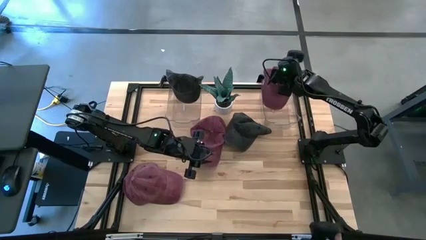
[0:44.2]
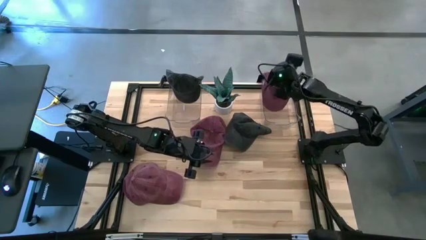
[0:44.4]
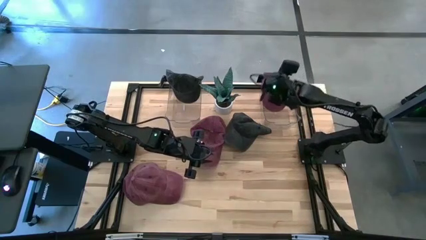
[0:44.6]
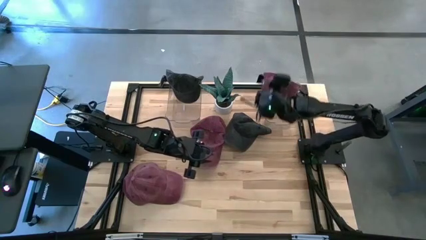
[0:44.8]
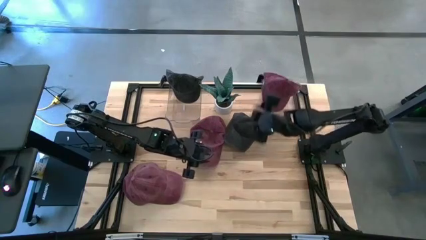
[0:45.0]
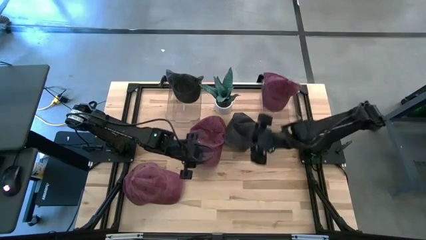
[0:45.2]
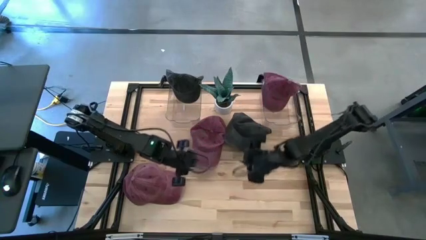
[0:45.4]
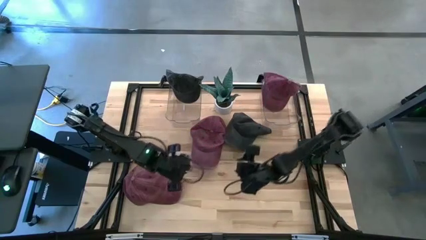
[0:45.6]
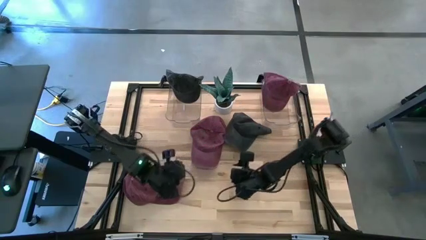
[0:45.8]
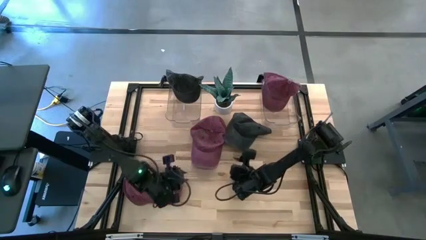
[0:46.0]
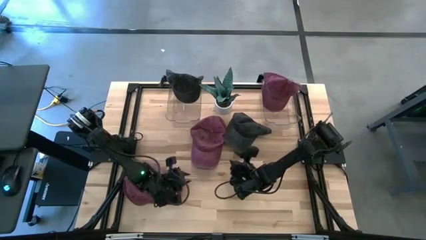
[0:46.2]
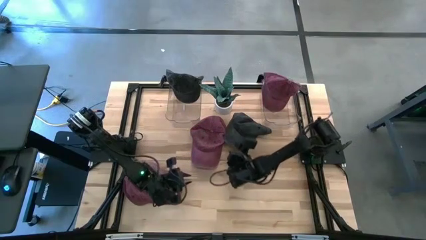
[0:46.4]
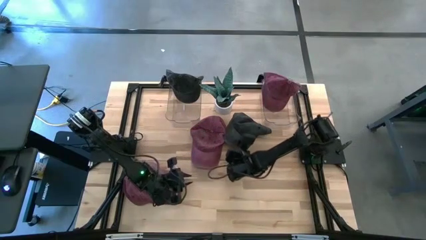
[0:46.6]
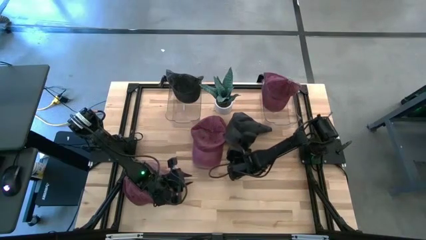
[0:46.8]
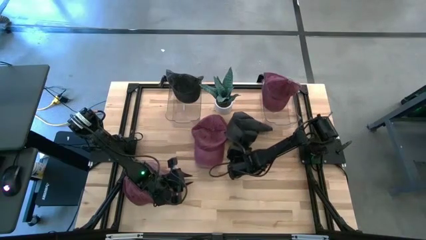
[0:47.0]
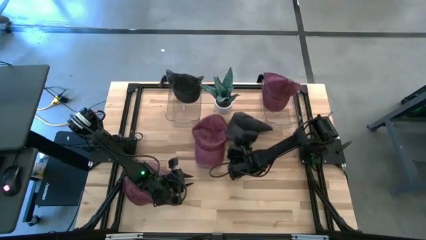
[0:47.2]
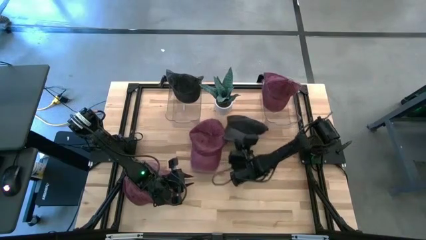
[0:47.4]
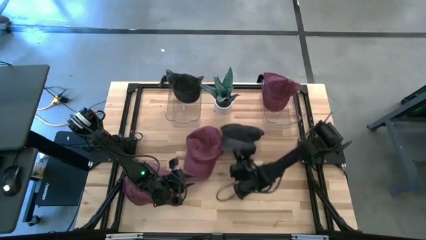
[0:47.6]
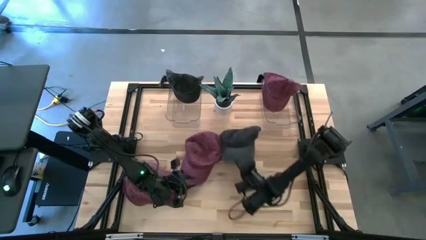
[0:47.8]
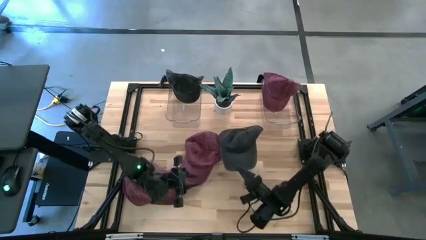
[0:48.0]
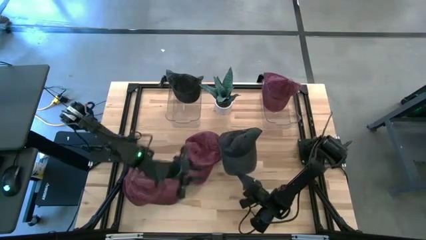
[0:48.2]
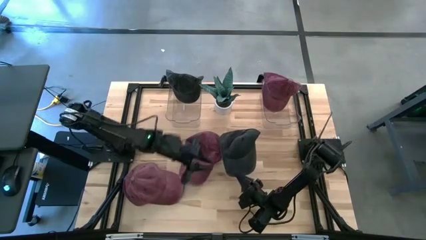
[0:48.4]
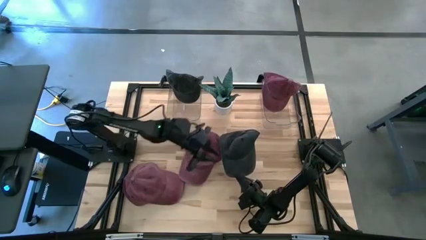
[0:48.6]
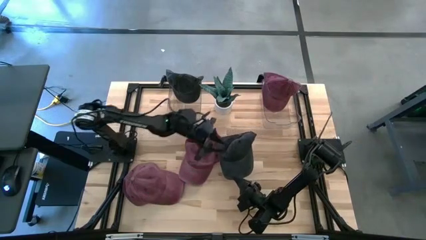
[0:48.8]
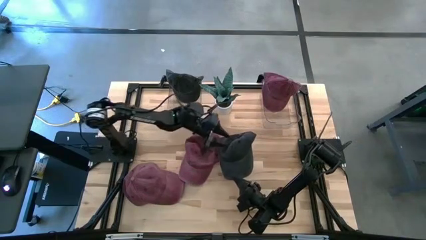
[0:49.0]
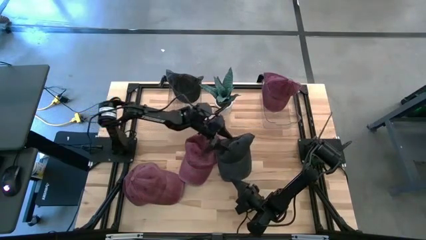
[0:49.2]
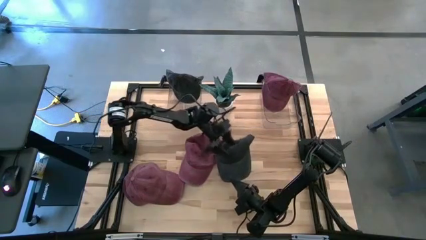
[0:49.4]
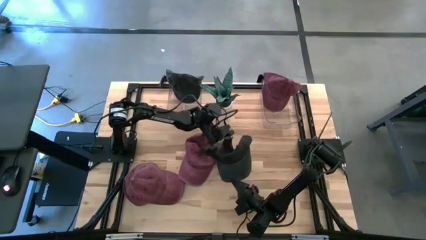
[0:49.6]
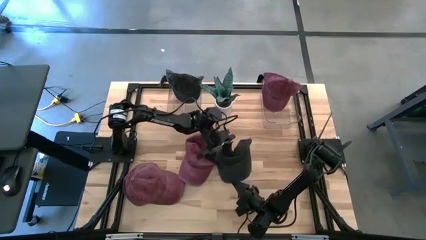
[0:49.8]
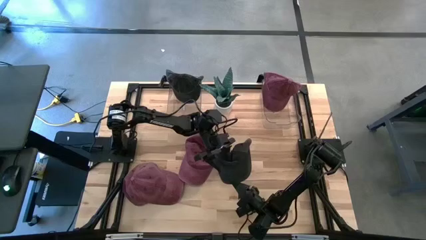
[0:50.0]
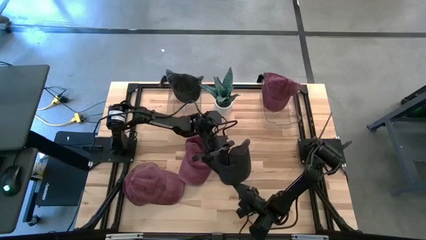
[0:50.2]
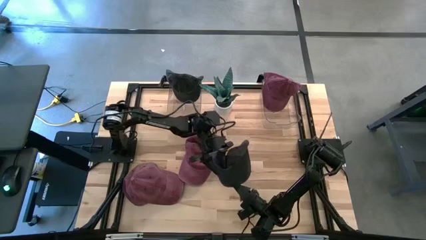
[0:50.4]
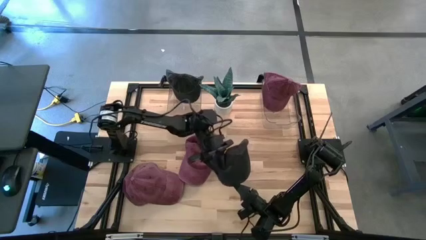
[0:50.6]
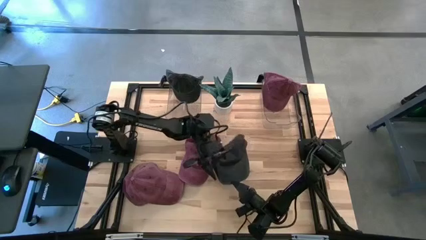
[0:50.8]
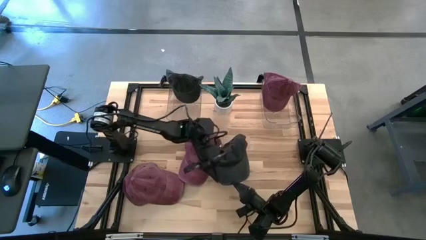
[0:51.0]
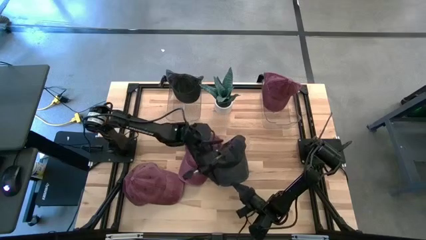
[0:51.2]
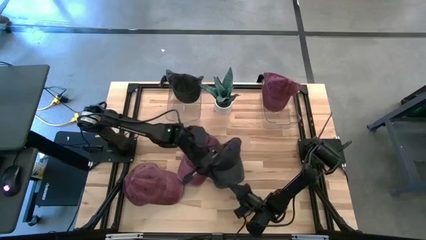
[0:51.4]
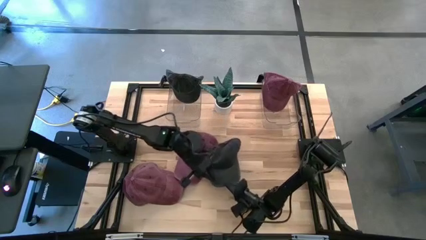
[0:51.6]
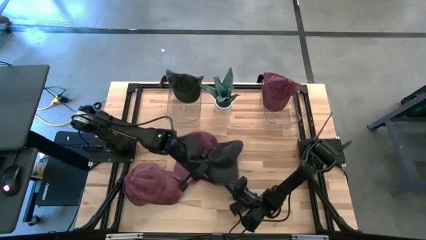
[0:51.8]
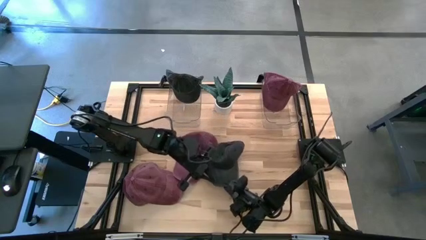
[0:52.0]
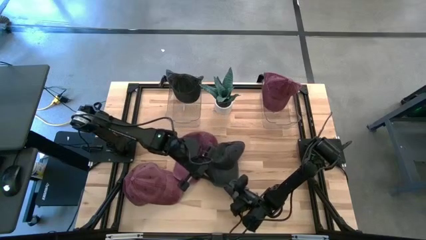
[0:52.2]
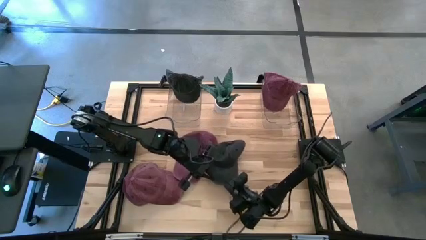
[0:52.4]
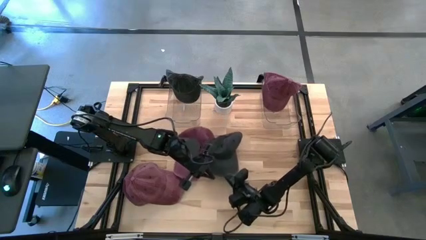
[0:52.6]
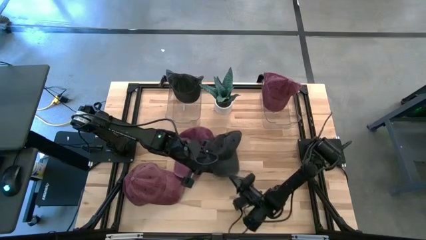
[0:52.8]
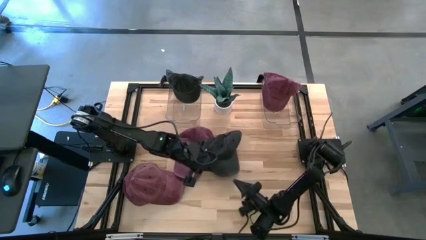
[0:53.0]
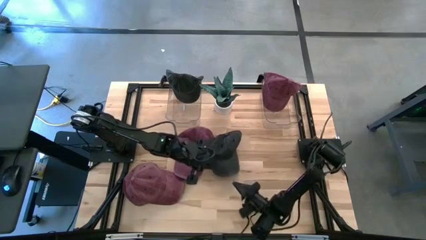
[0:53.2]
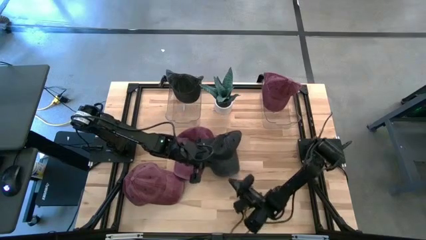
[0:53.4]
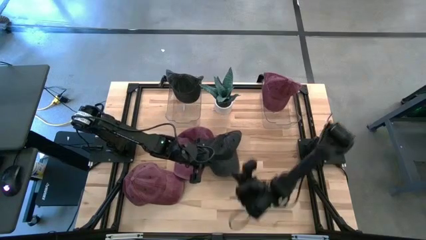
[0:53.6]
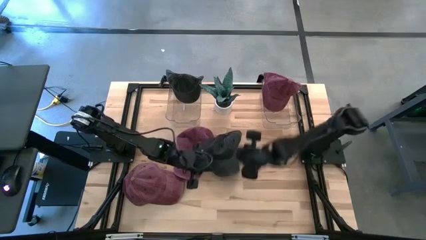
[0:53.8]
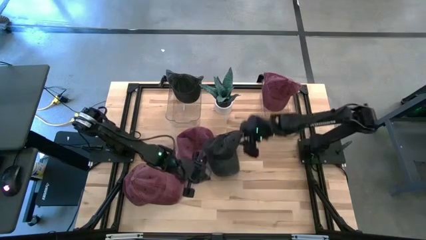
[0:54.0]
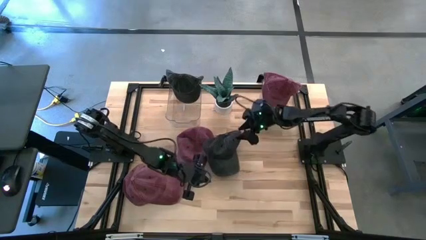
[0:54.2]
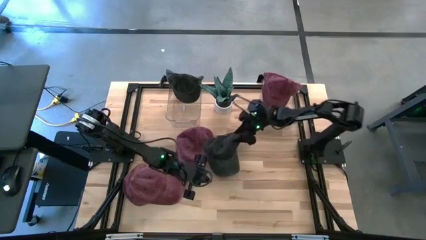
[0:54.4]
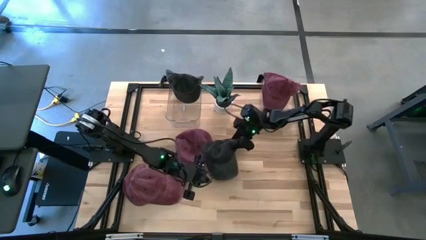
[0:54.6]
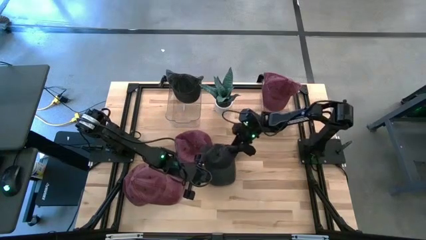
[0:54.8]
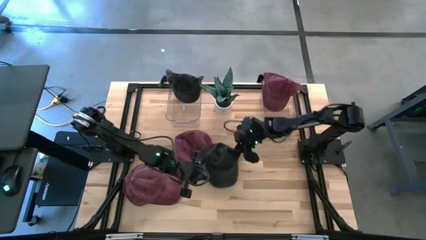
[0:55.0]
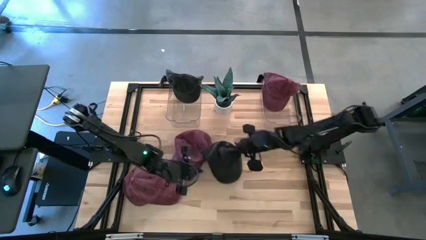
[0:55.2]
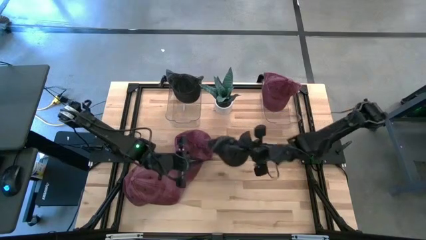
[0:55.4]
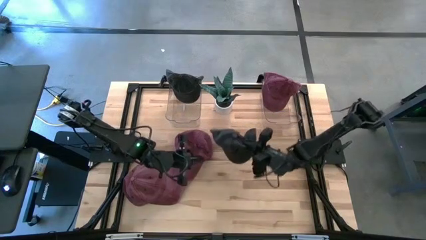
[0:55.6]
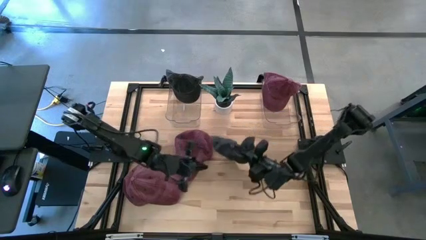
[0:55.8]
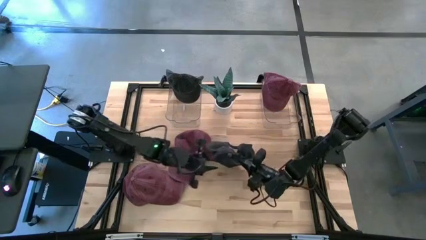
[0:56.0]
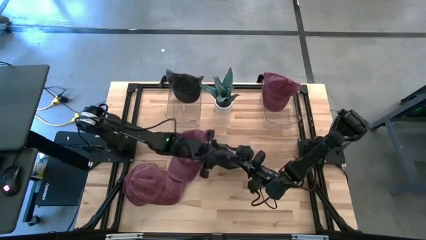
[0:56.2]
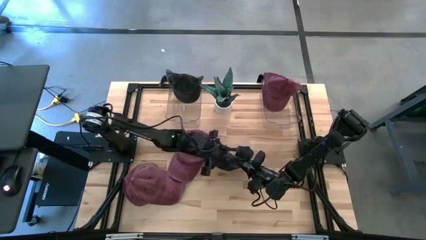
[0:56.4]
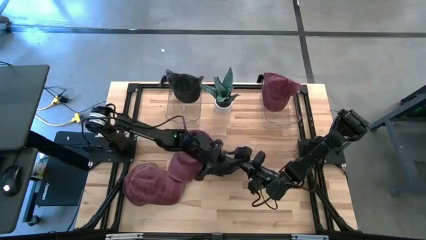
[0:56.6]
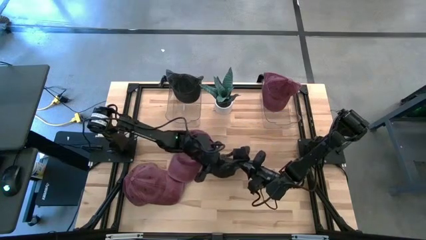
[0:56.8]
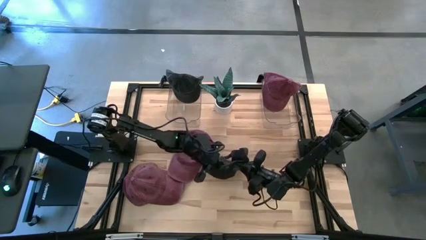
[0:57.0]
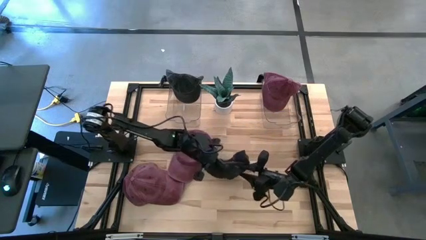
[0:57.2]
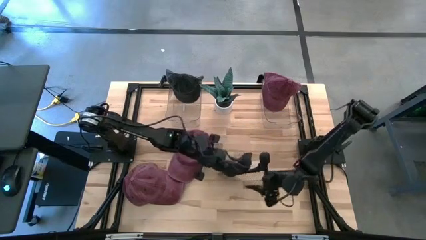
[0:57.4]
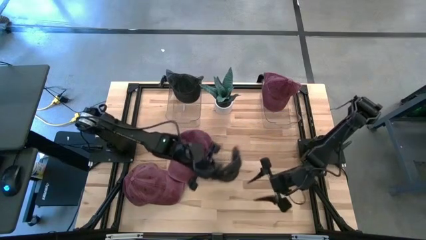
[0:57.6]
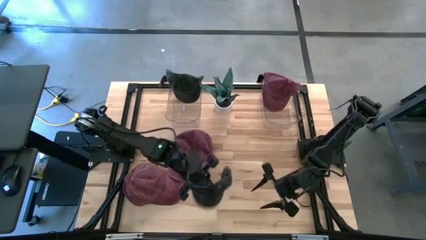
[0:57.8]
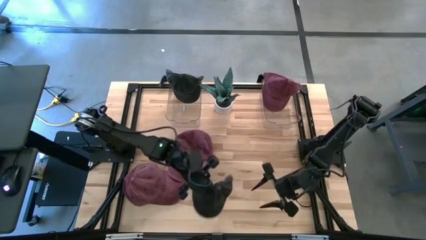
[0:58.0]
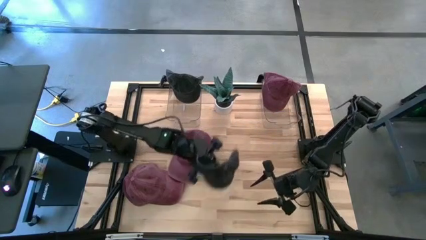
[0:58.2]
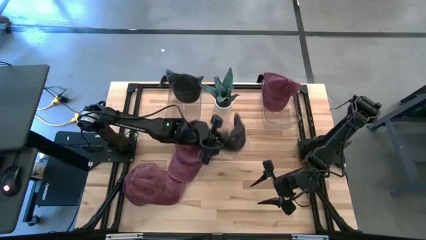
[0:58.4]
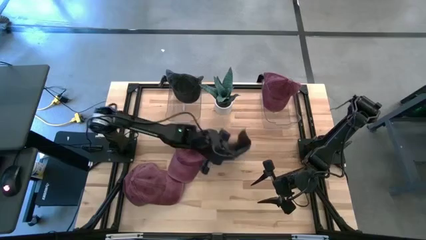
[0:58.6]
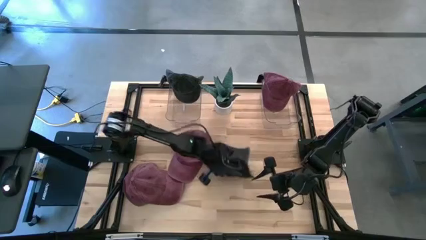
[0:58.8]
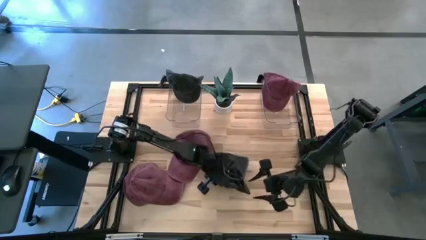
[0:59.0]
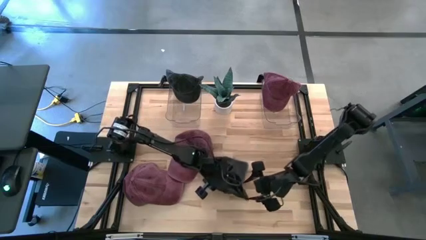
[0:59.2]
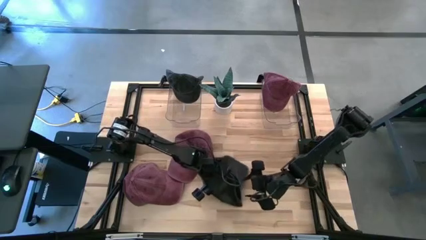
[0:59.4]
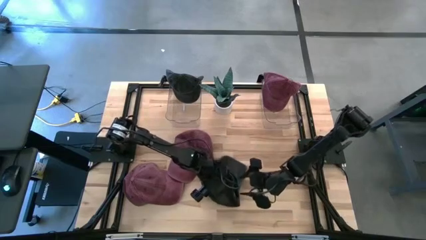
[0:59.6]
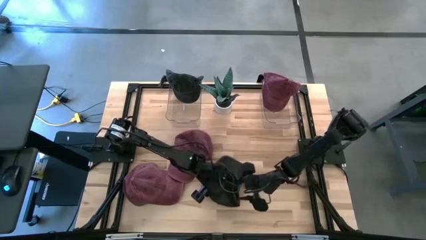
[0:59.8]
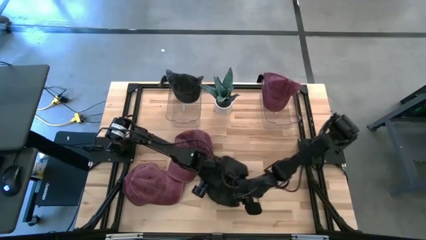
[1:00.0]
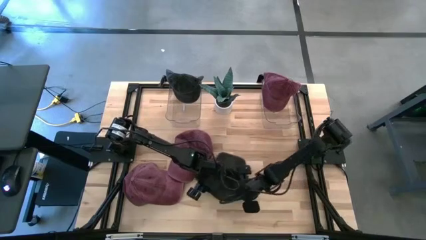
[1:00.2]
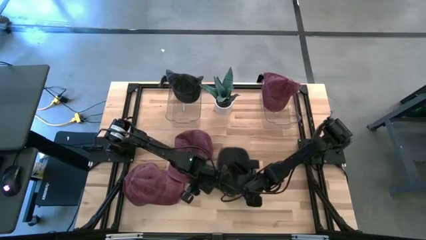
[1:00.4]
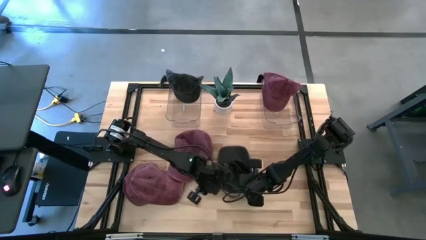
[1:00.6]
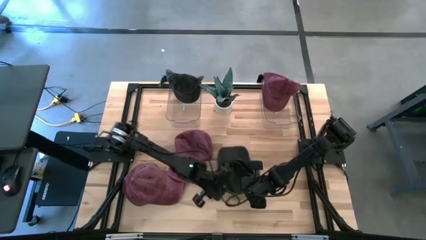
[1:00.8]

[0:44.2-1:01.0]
Task: Pick & Place hat
Put the black cap into the left transparent bin
